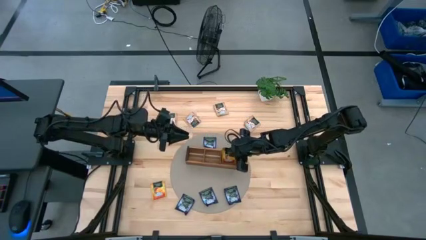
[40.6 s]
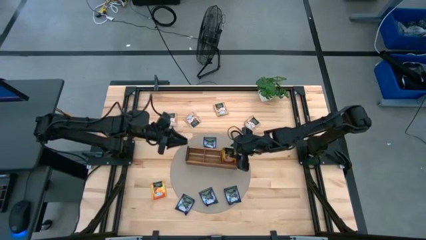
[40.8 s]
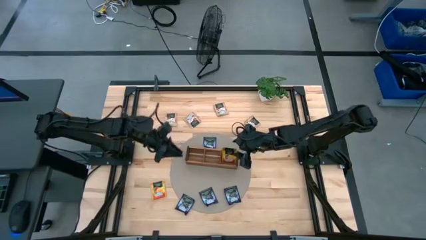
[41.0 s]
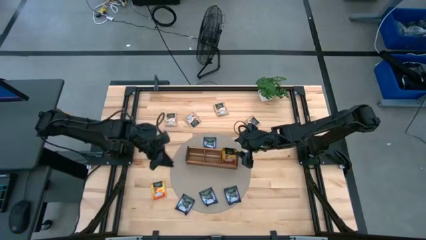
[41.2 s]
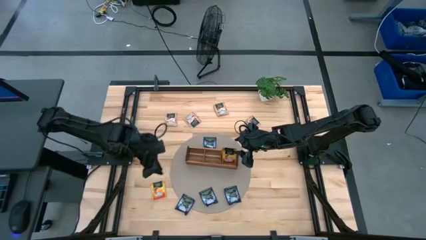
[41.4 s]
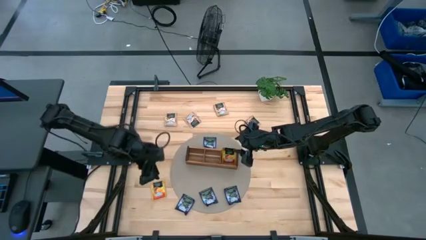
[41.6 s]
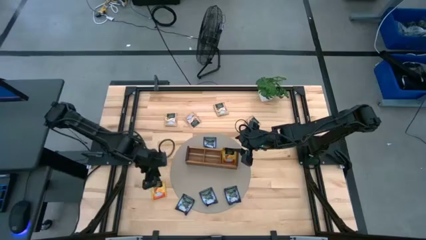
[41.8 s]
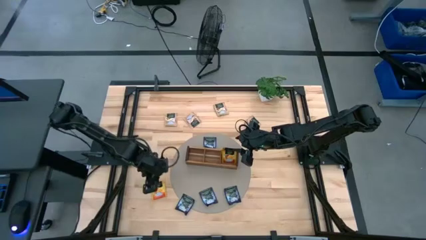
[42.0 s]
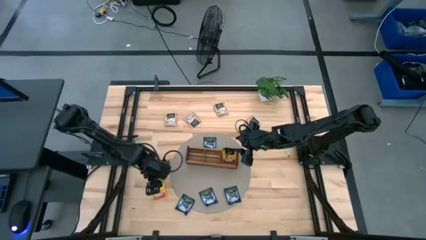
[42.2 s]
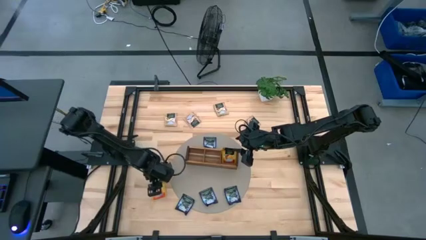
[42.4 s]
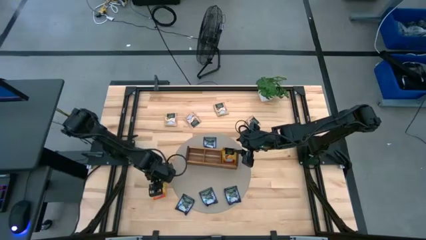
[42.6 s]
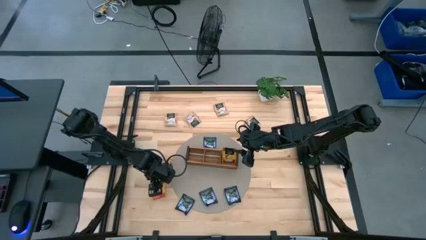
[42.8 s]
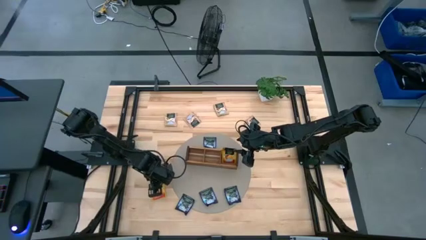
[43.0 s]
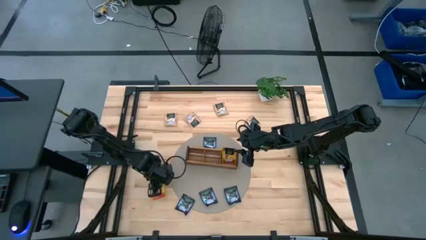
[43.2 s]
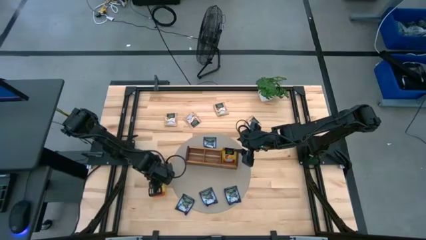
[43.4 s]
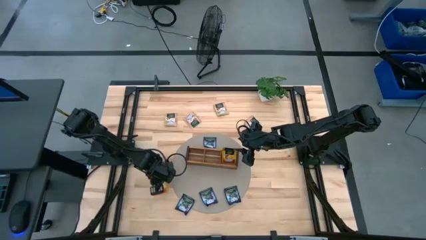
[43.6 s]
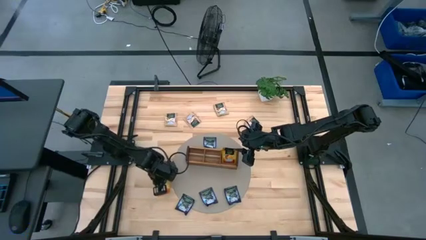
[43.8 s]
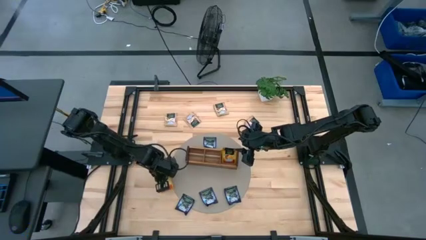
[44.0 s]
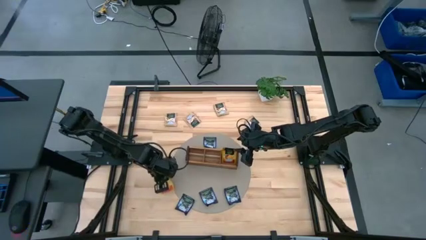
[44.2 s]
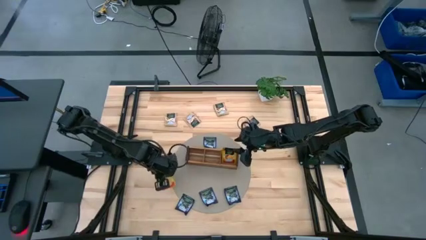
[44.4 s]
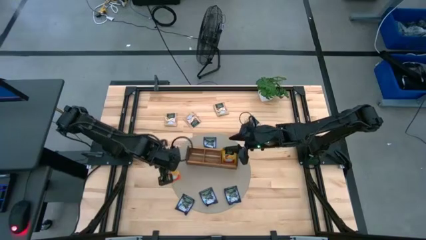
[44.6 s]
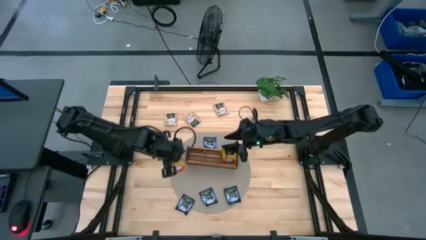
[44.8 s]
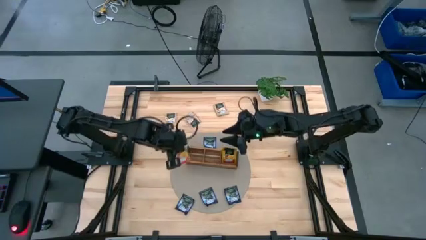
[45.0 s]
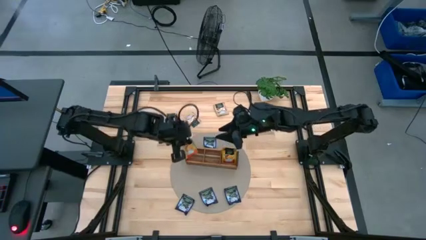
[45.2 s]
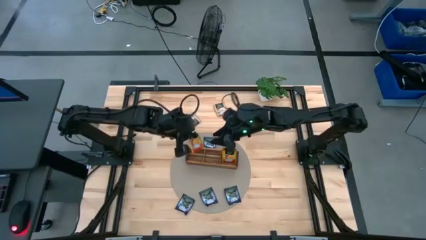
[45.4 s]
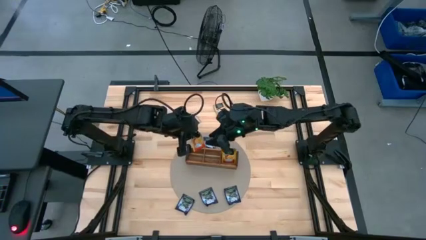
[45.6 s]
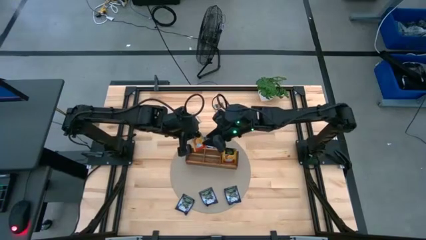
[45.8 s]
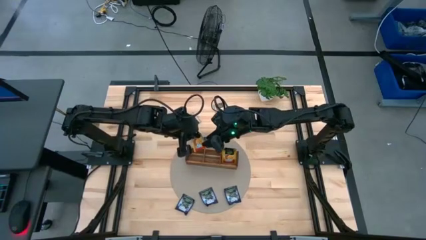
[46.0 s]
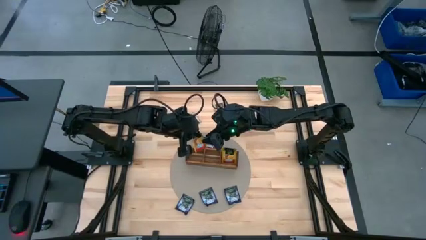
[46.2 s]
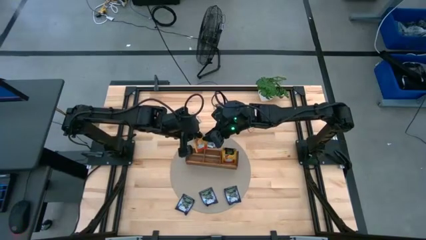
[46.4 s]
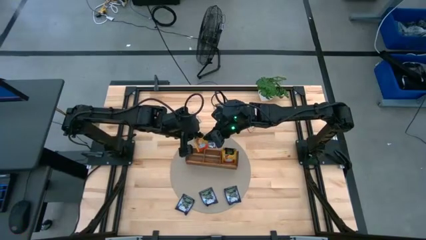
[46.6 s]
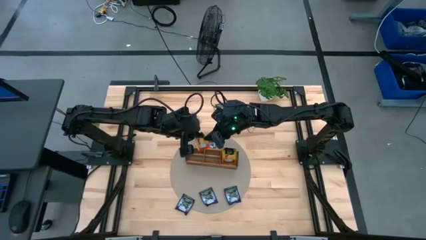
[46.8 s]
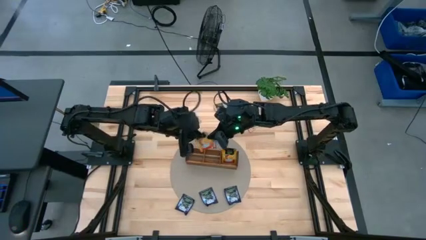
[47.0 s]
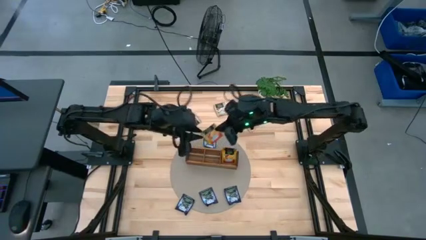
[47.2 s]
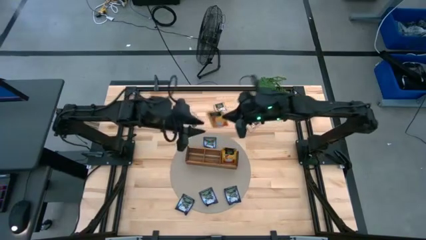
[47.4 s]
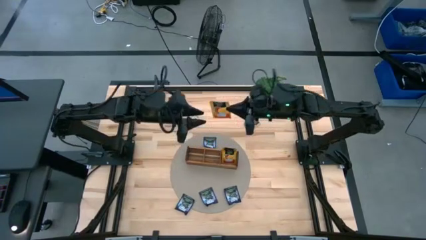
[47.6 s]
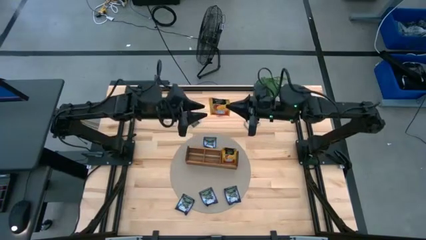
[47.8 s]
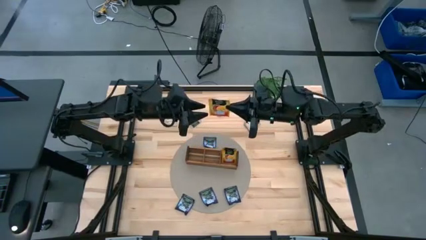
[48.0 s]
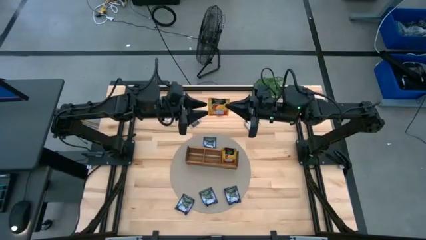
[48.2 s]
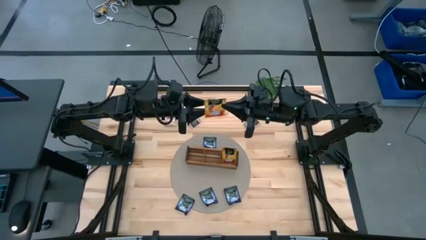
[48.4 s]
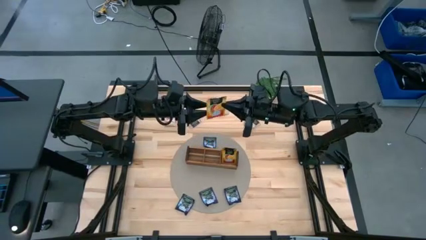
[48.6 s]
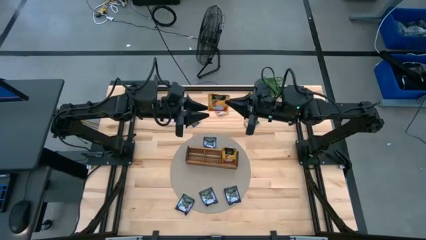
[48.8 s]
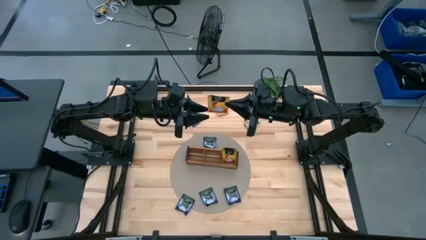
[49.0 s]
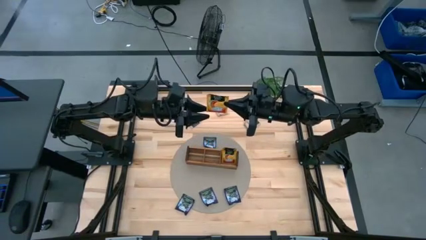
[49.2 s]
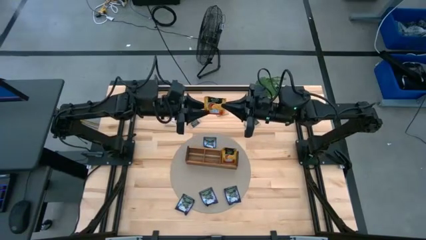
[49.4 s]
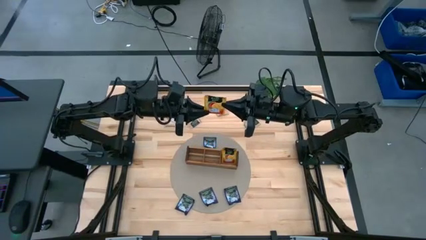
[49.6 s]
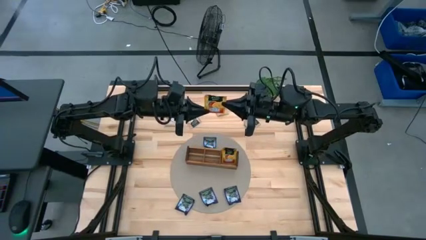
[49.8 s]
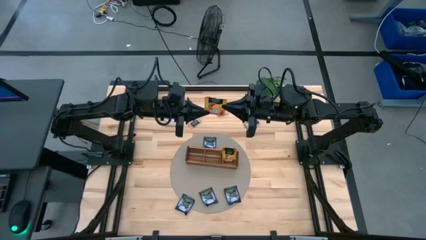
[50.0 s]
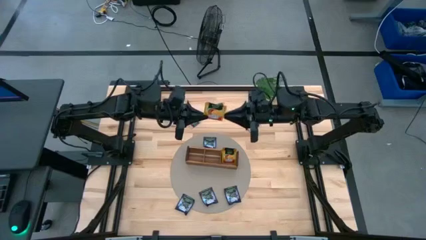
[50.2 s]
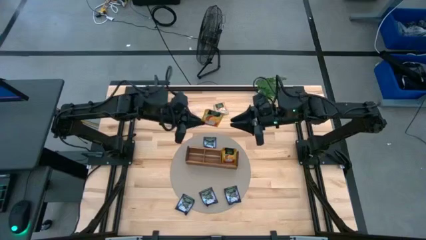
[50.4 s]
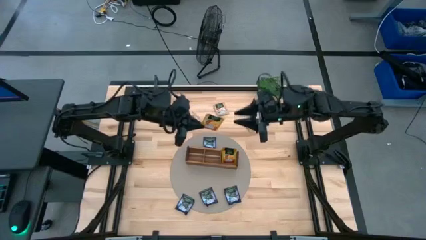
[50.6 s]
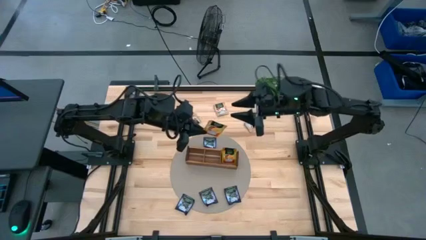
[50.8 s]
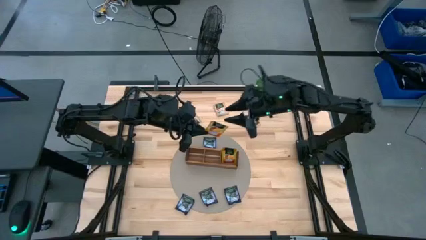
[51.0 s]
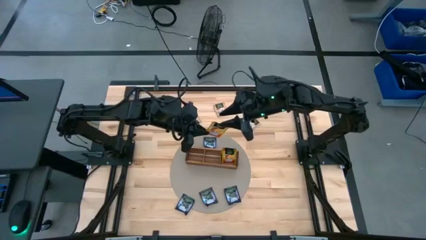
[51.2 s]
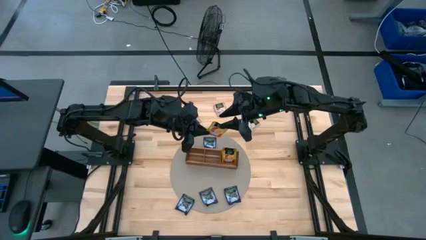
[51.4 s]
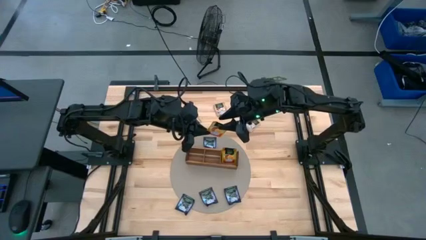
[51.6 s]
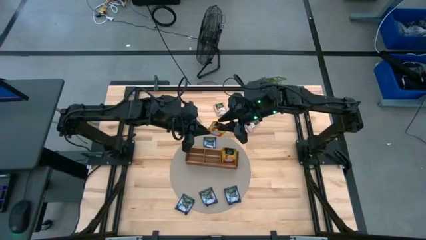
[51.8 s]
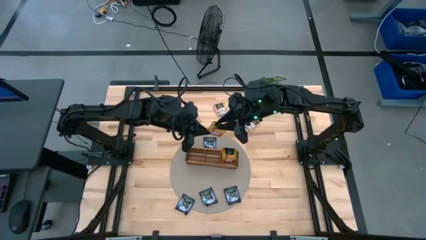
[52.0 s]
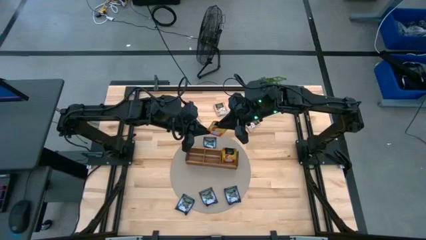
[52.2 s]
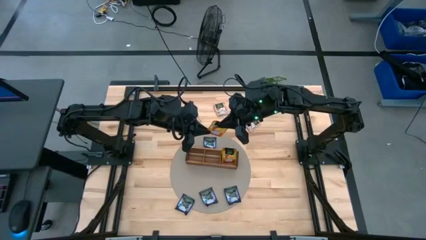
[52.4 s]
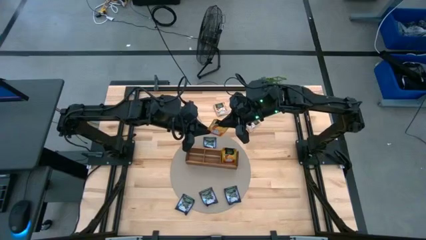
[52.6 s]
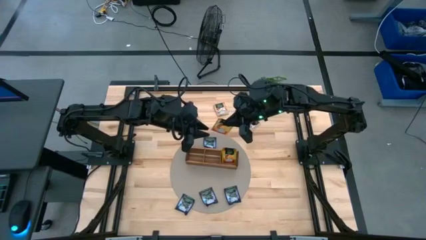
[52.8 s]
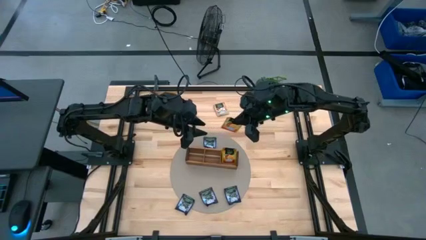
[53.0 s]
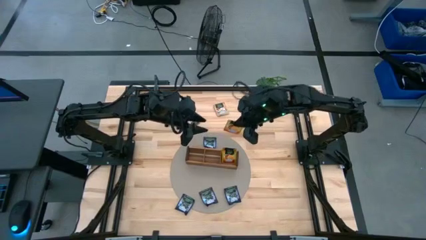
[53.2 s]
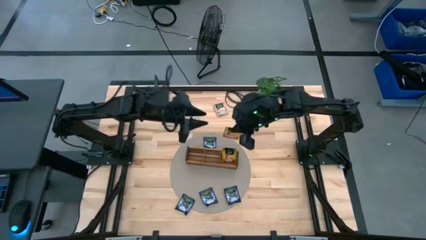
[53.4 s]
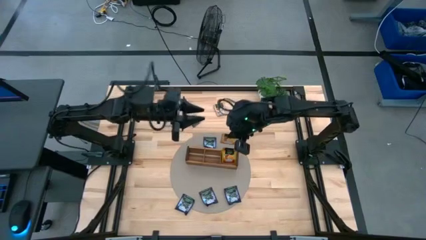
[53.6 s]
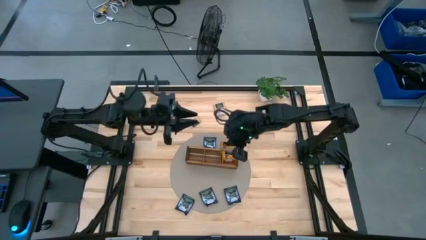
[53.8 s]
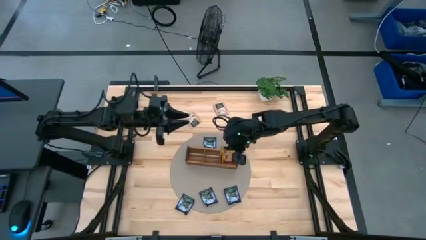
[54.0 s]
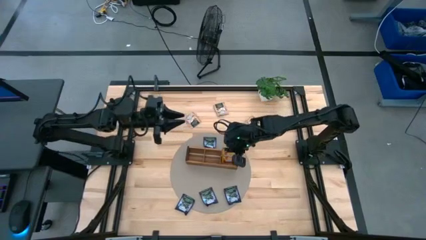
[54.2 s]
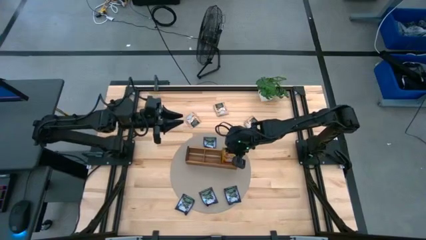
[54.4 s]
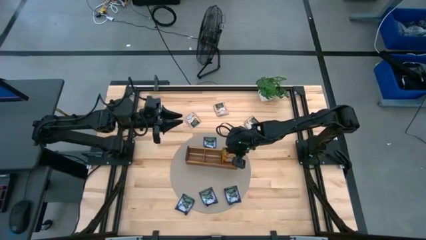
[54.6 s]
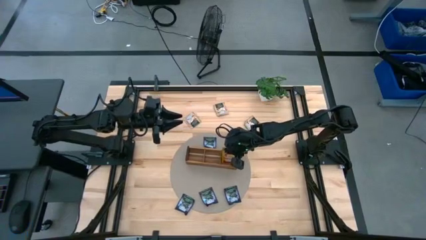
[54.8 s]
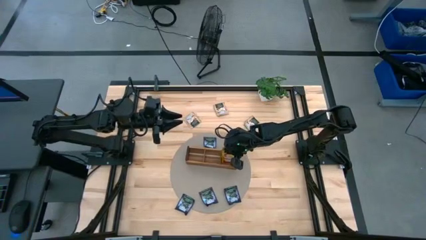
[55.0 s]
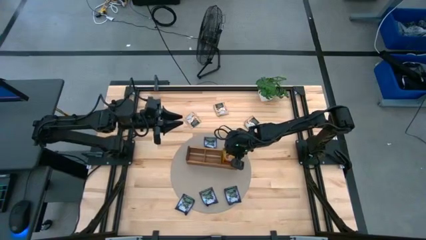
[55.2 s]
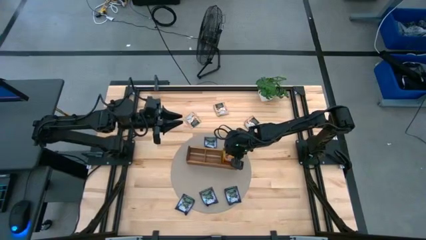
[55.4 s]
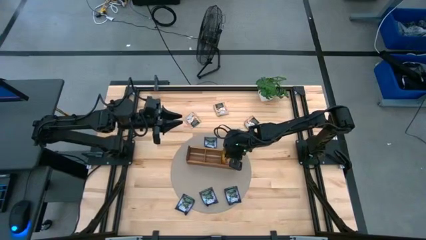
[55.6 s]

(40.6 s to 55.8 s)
Task: Pick & Place Tea
Put the yellow tea bag into the right section of the wooden organizer

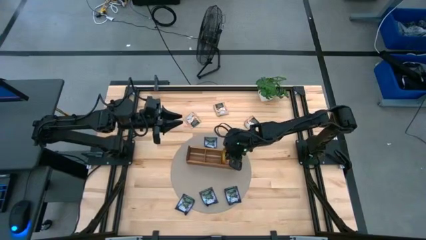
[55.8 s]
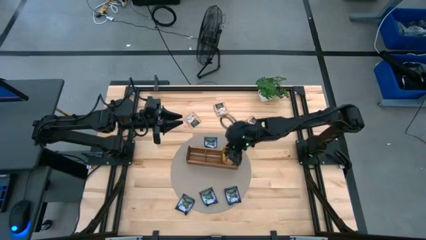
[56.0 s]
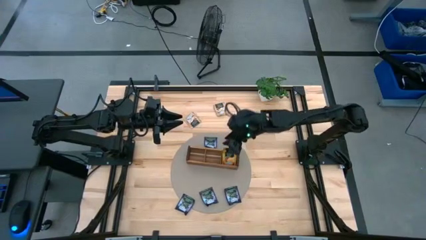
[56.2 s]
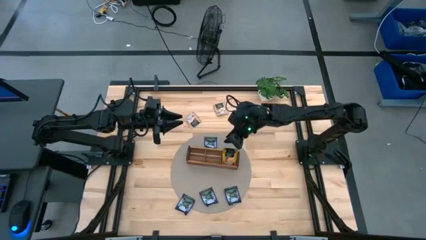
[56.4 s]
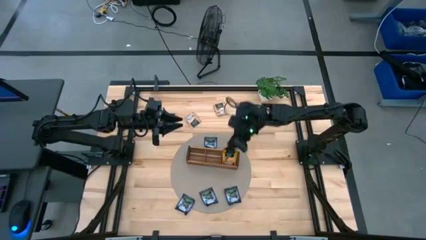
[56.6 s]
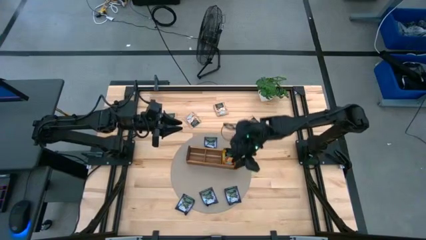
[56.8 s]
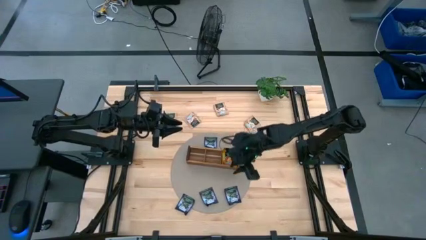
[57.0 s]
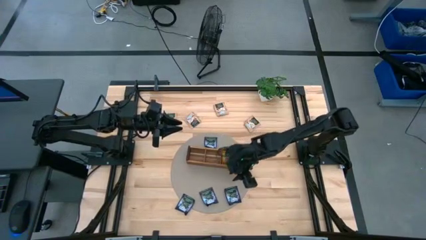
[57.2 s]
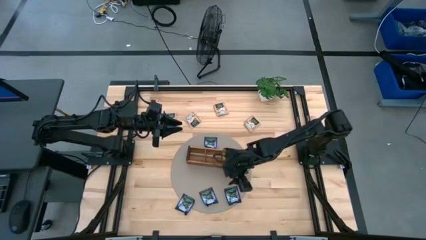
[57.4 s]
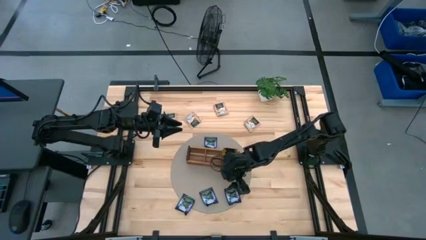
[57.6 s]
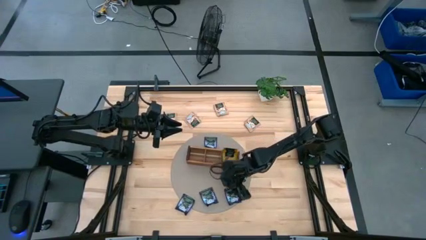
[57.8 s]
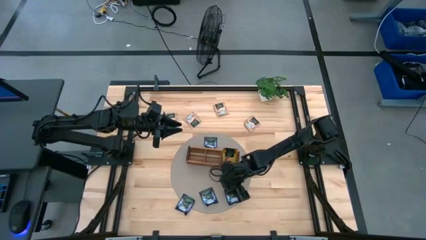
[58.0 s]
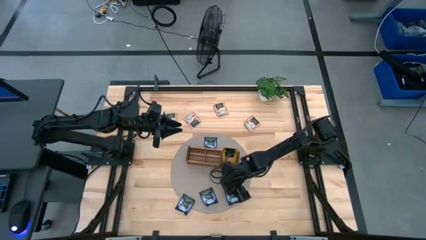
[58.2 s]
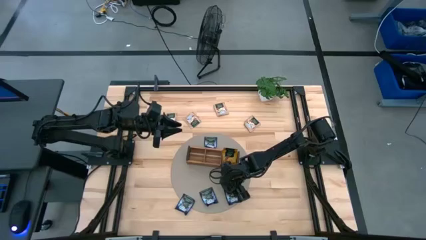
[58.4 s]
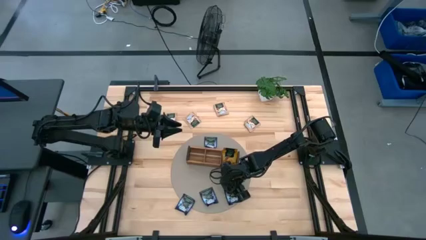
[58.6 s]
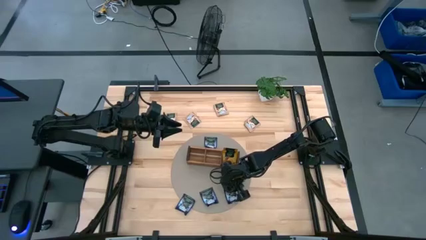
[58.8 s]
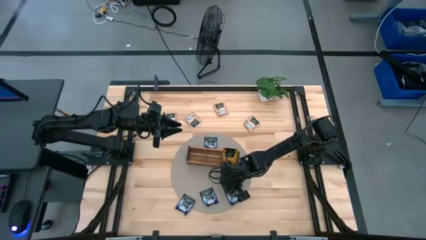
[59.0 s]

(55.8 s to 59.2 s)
Put the purple tea bag into the middle section of the wooden organizer
